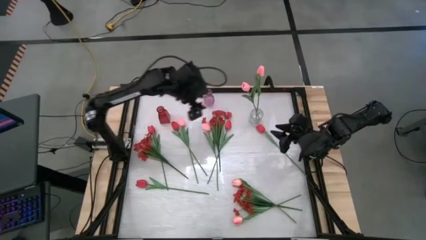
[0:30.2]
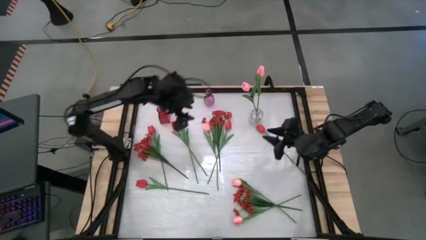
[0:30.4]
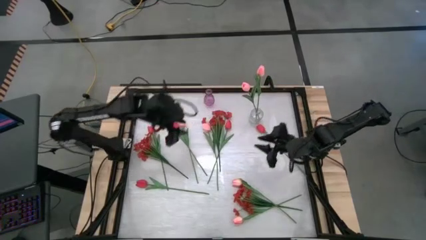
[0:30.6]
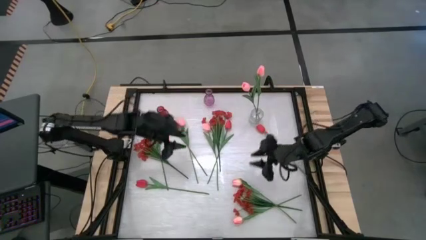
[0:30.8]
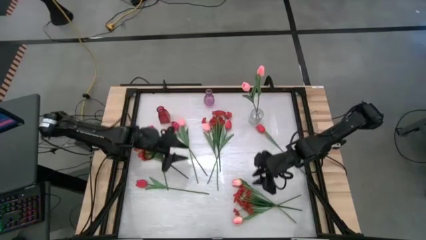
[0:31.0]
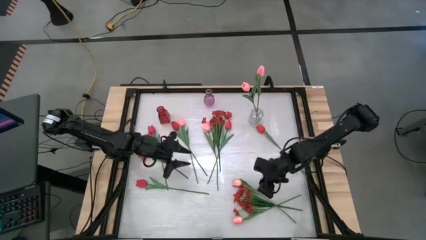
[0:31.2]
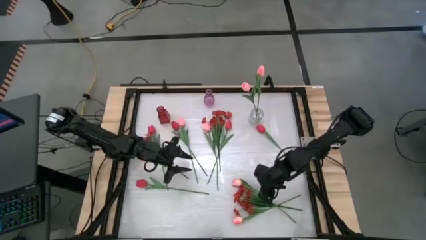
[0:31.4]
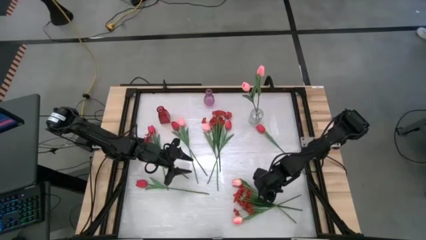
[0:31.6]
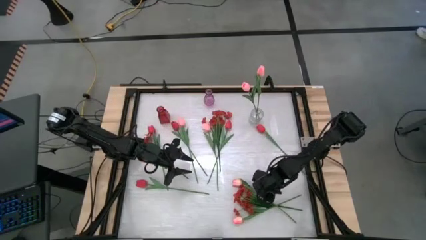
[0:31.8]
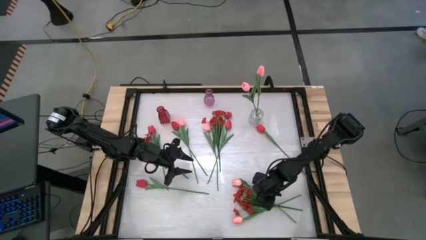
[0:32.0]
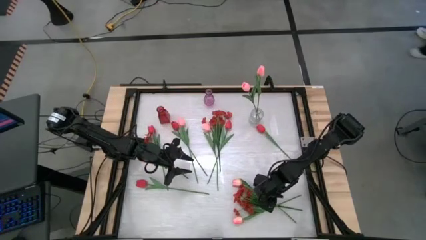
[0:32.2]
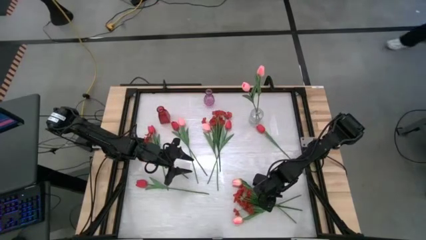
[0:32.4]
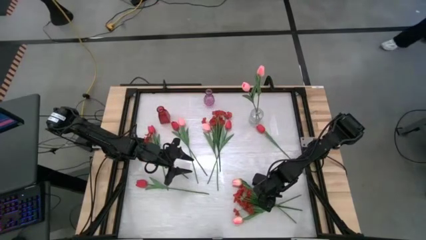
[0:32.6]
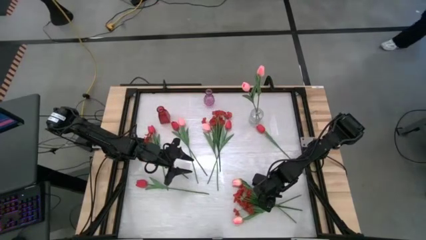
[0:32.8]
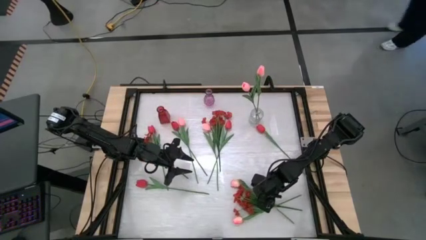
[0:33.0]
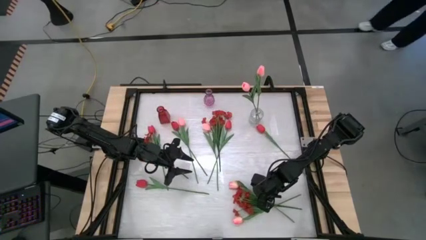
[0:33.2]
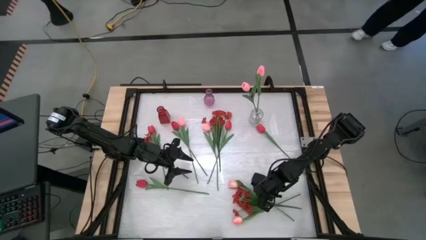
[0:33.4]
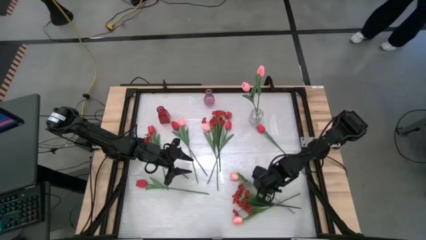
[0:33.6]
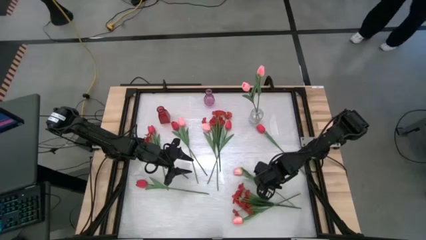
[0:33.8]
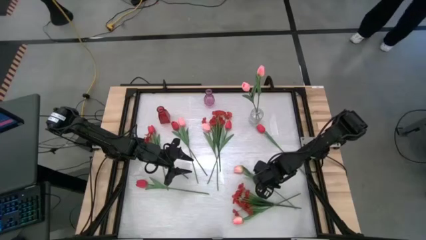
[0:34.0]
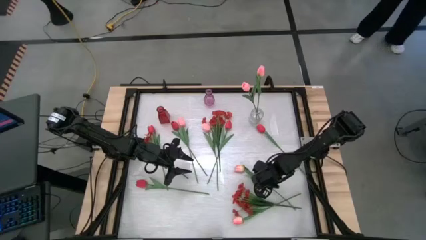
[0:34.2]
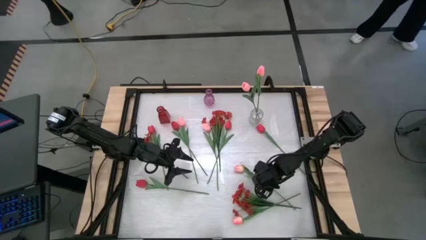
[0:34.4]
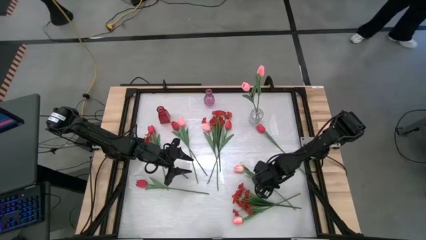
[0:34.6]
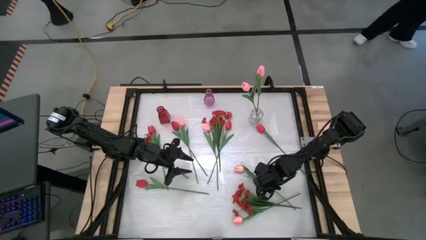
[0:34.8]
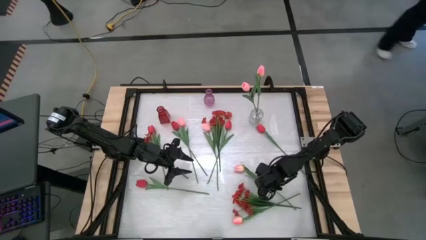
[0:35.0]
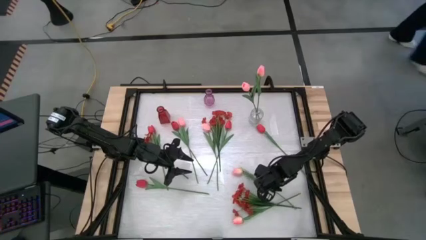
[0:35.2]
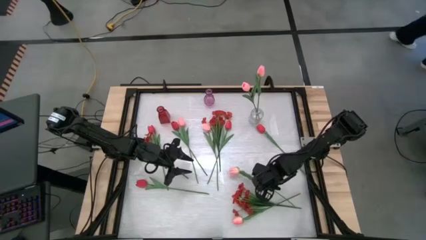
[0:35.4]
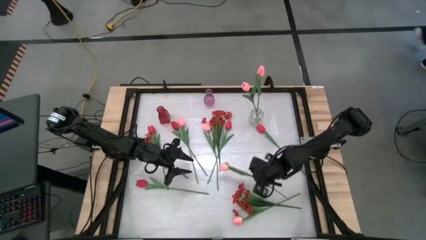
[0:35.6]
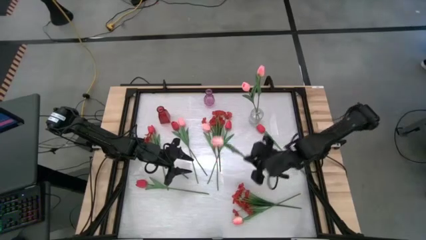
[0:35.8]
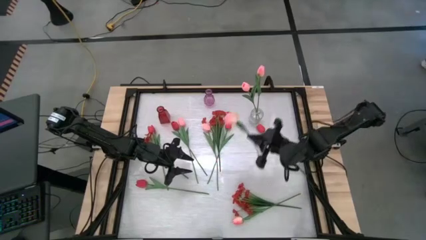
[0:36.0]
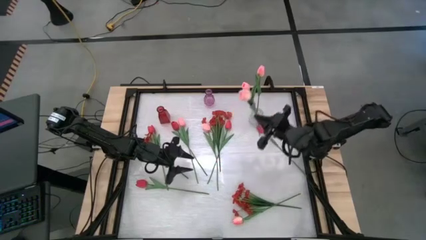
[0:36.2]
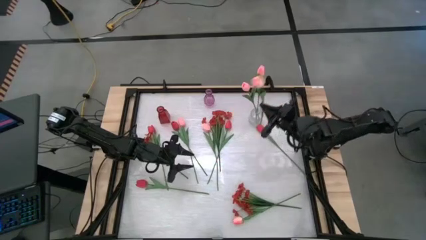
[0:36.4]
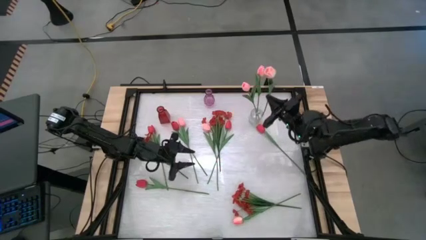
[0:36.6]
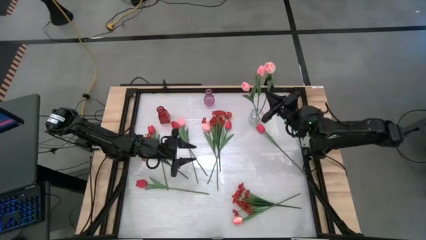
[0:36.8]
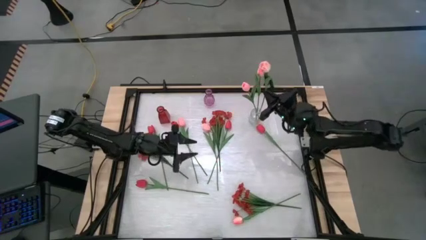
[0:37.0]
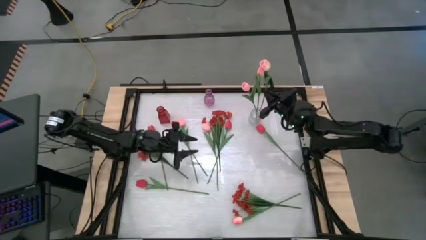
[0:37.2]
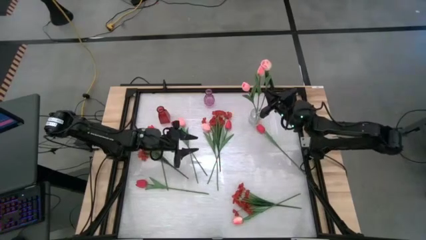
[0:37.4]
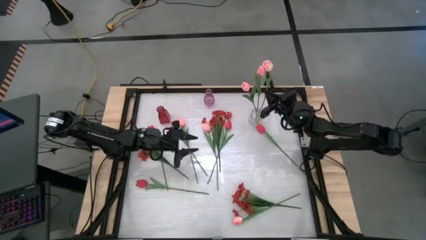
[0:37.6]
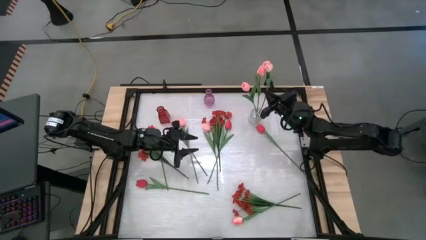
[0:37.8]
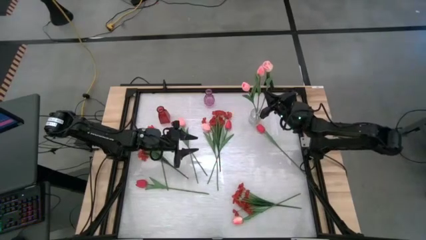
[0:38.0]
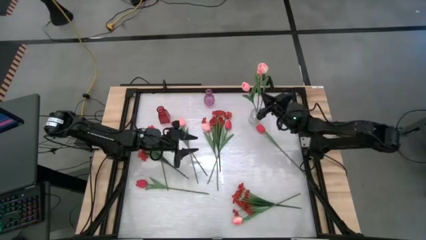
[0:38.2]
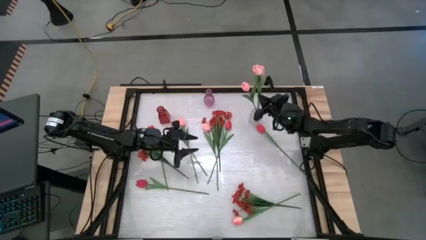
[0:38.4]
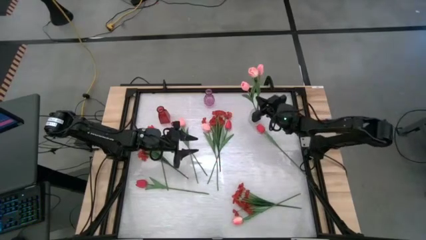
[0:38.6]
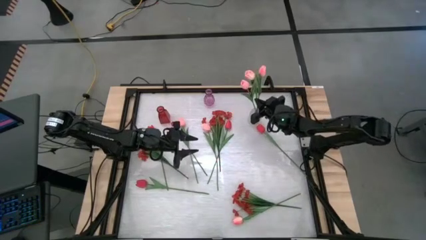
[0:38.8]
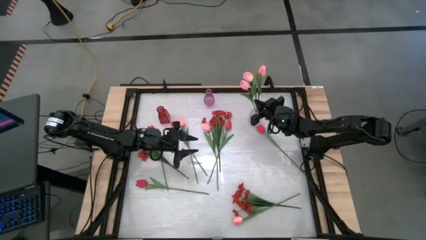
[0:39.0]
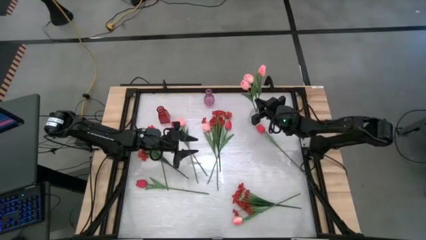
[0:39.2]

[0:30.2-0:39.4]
Task: Sort flowers into vase by color
Put the top right pink tulip into the transparent vase

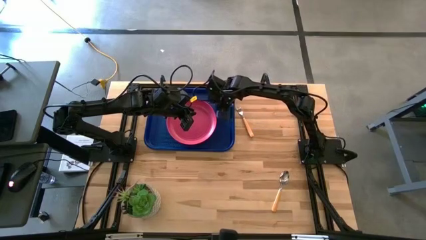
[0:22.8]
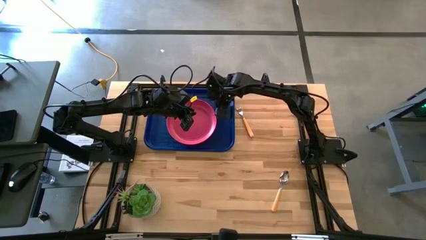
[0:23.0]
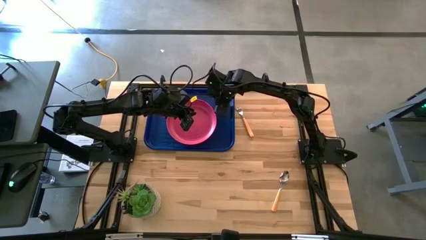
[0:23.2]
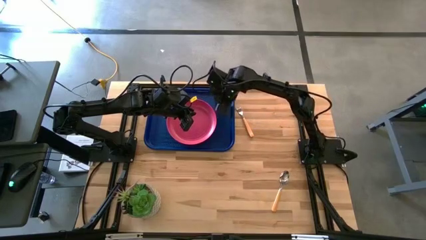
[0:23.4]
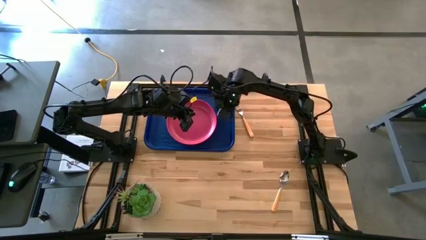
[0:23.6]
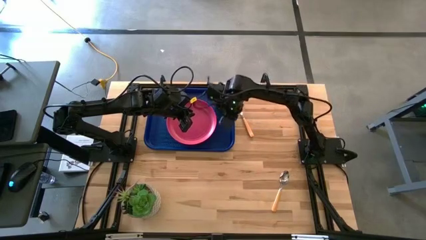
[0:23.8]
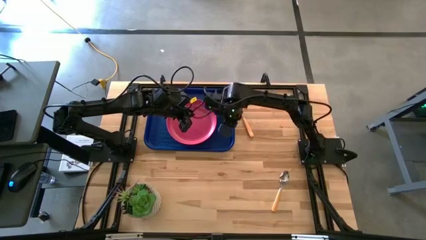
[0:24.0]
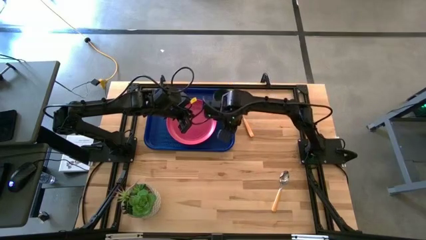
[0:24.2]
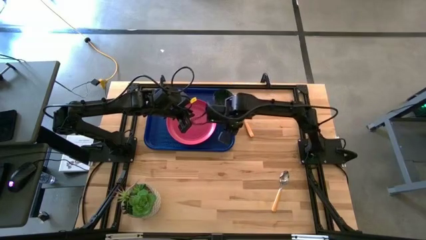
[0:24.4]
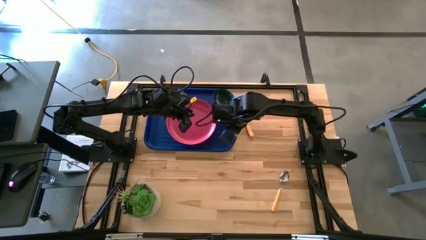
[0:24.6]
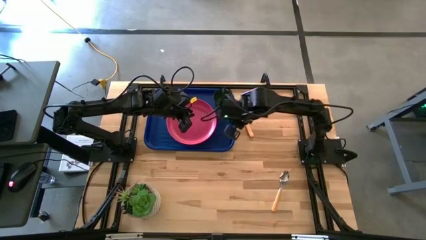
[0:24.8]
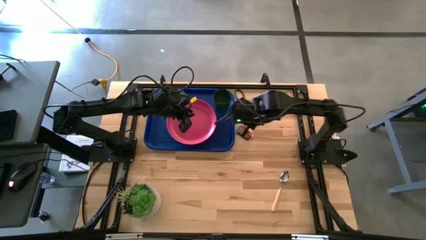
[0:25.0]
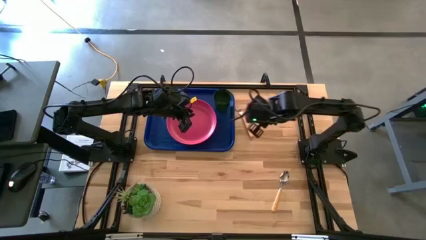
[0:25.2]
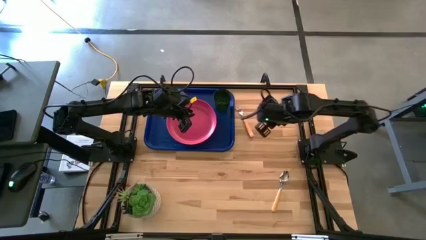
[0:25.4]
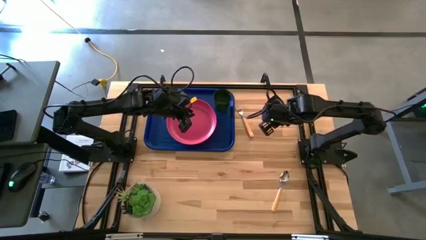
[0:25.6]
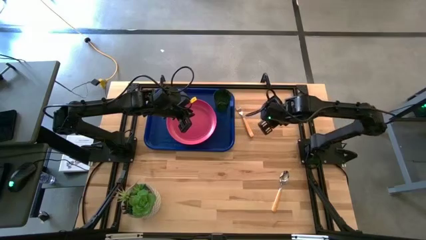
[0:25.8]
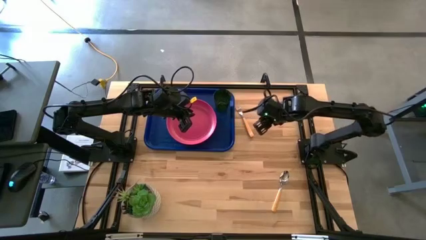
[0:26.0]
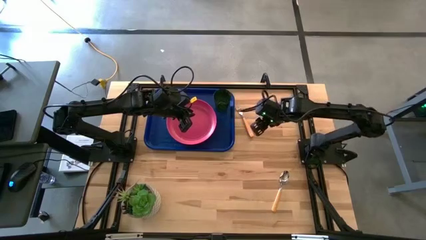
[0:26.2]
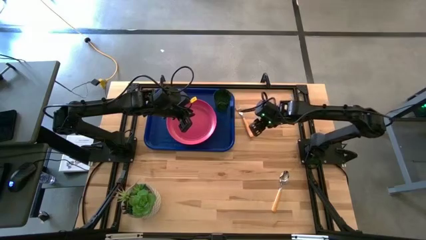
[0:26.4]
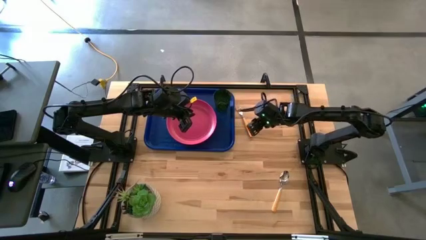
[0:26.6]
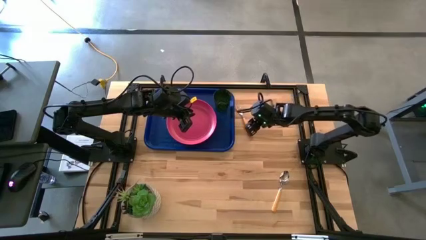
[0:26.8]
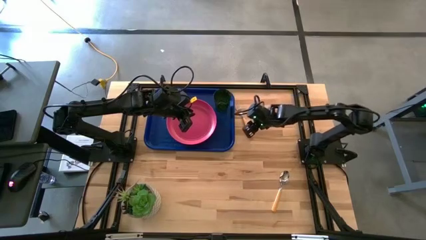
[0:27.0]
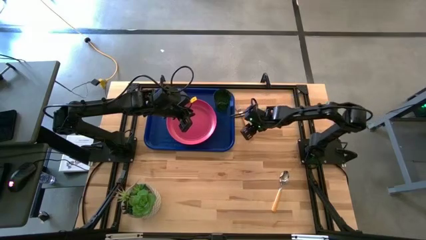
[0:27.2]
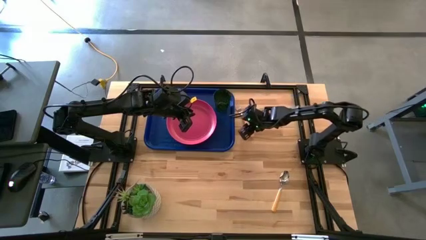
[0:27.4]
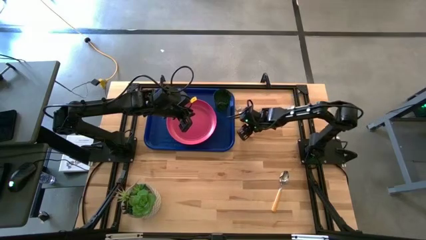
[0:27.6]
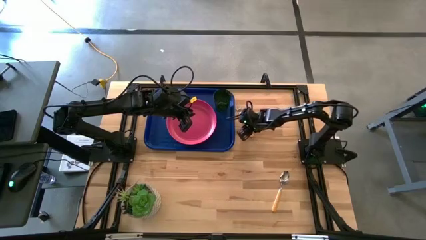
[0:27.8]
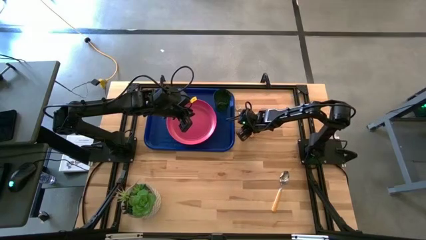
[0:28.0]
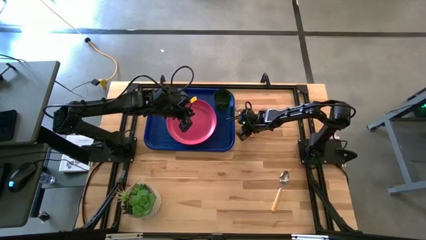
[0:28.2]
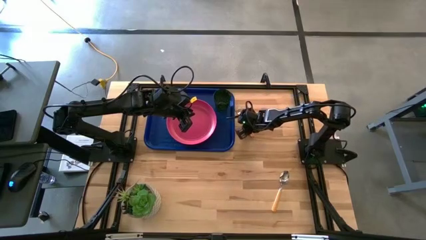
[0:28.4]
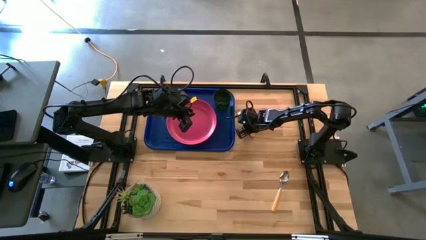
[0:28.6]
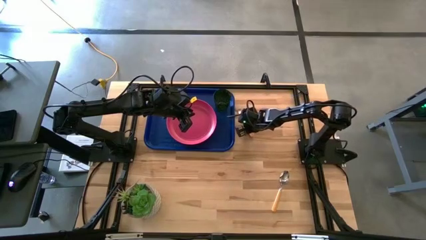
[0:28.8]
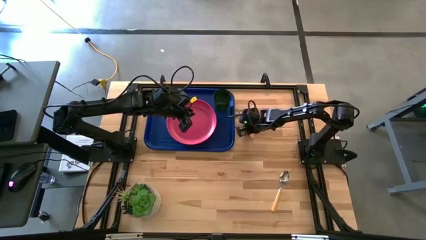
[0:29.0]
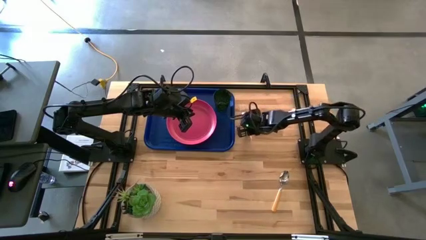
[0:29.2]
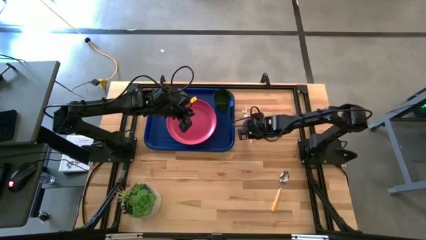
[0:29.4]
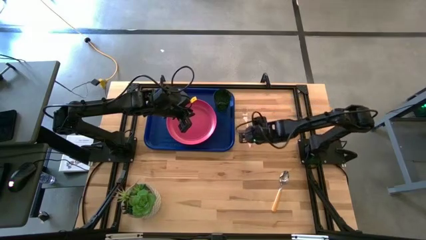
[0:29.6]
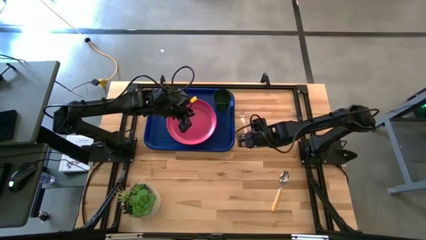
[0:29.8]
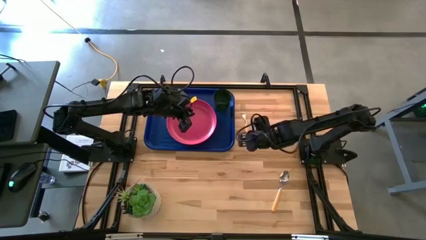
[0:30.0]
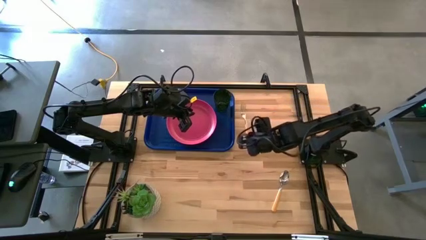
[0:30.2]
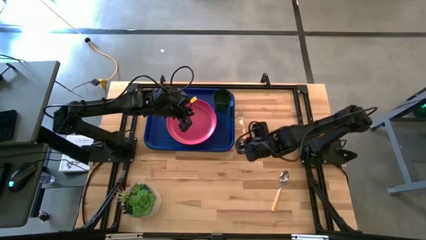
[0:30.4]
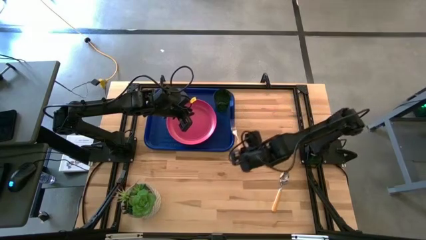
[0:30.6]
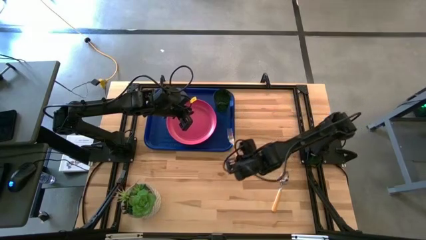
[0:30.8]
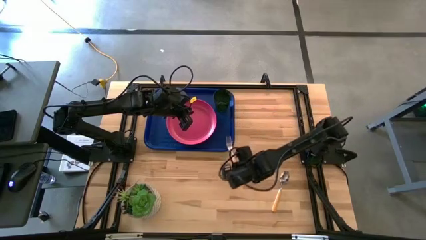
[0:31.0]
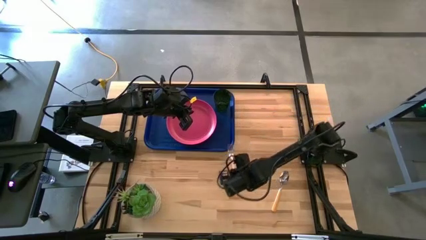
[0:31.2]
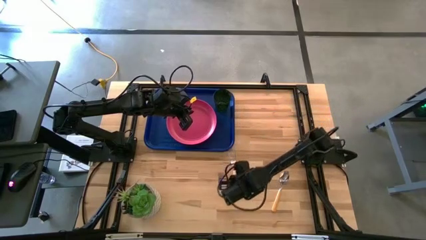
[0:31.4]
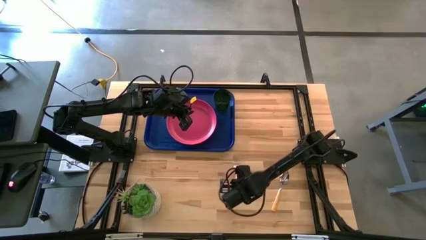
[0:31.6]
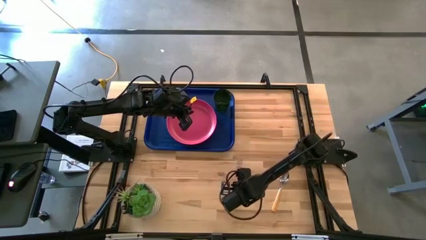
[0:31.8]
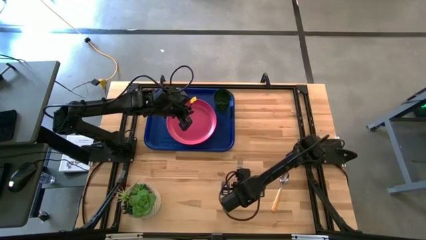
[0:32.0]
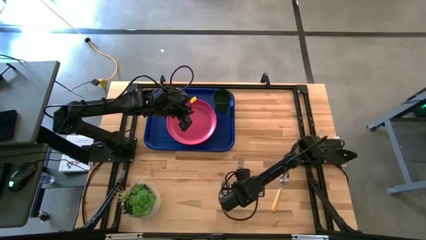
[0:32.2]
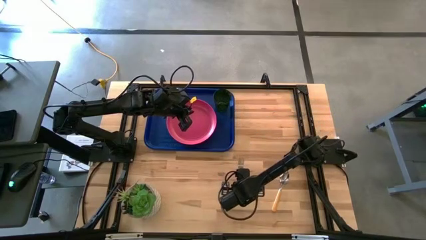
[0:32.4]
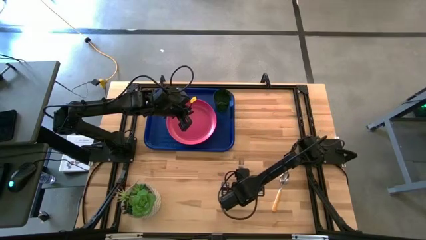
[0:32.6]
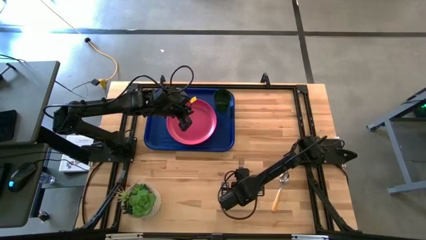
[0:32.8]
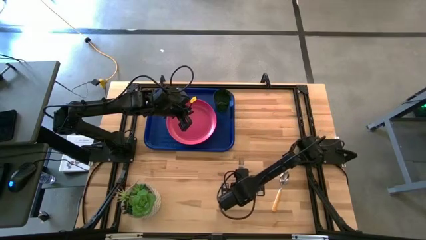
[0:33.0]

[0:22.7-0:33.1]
Task: Pick and place plate/cup/fork/spoon on tray
Move the orange fork to the center of the table
